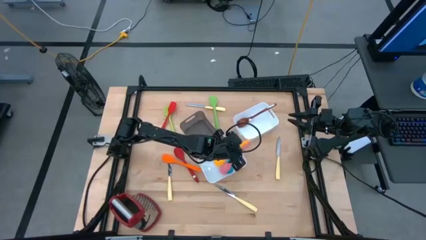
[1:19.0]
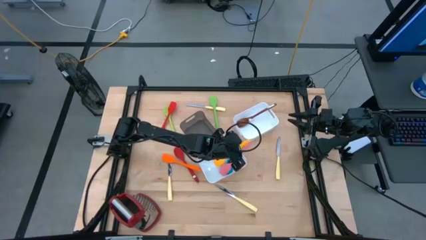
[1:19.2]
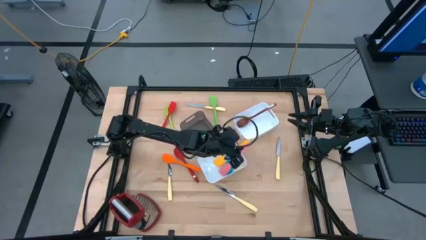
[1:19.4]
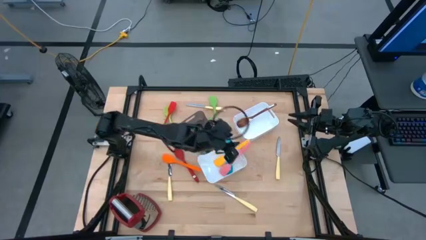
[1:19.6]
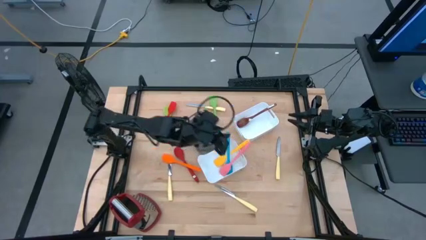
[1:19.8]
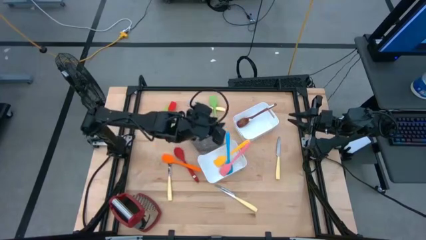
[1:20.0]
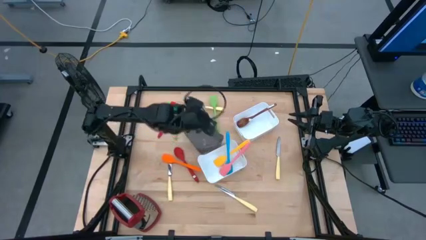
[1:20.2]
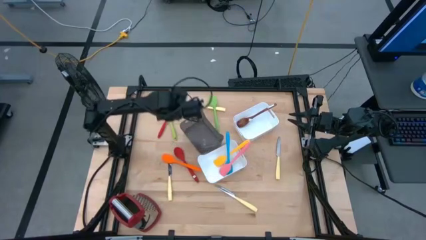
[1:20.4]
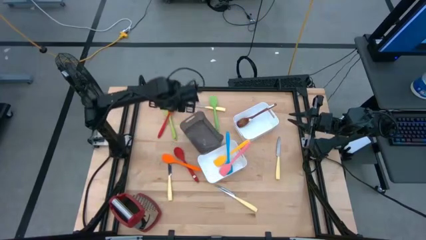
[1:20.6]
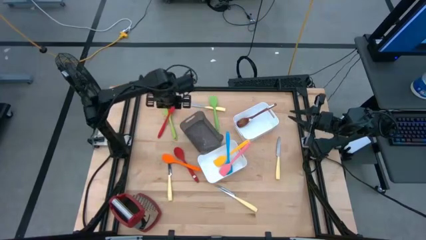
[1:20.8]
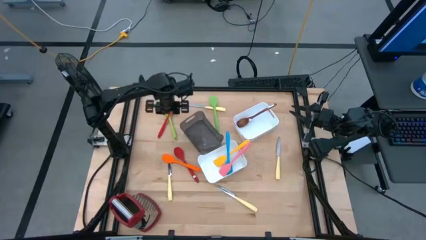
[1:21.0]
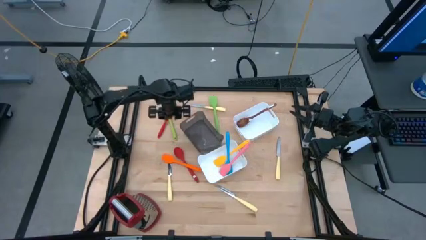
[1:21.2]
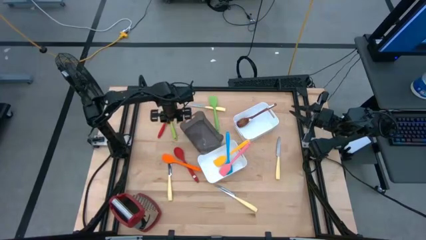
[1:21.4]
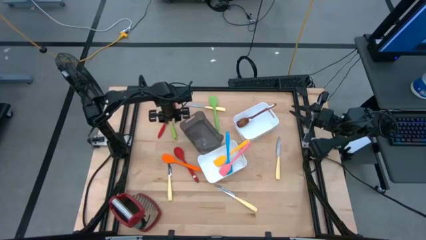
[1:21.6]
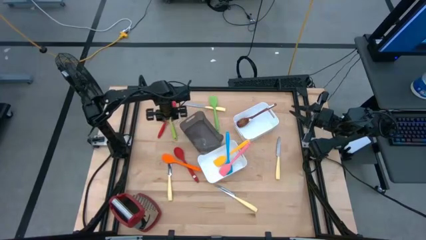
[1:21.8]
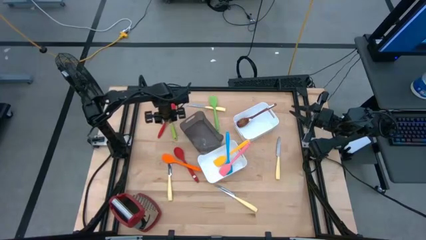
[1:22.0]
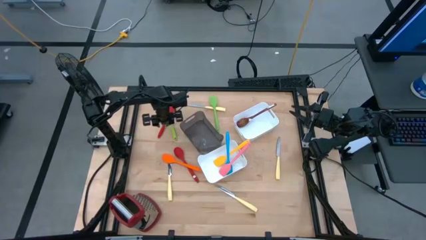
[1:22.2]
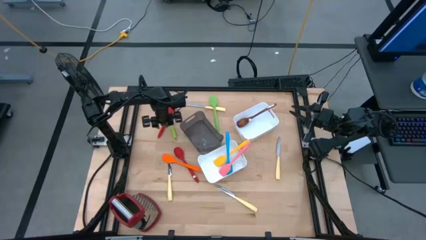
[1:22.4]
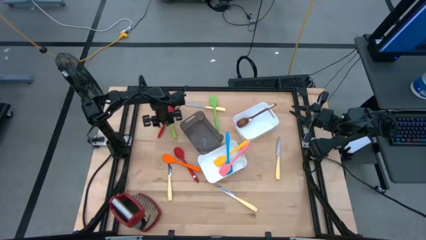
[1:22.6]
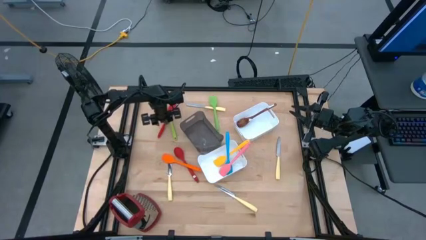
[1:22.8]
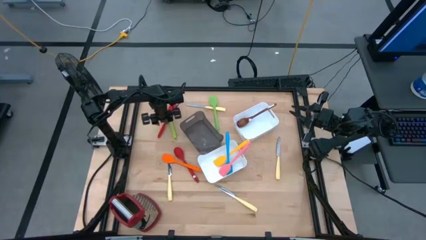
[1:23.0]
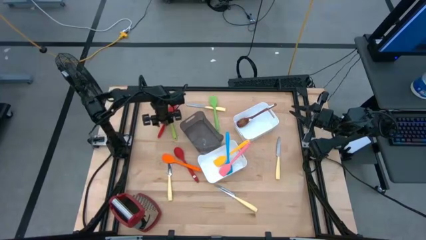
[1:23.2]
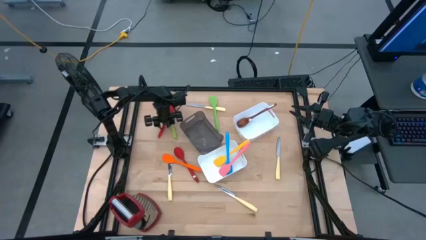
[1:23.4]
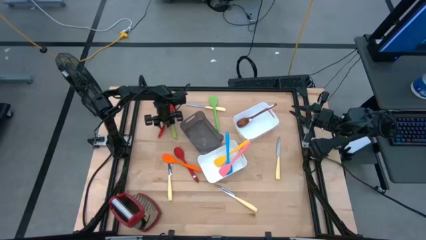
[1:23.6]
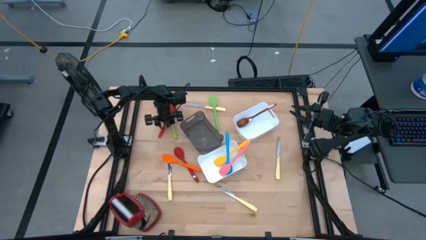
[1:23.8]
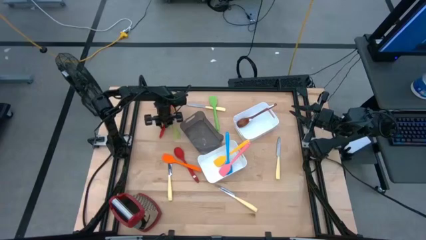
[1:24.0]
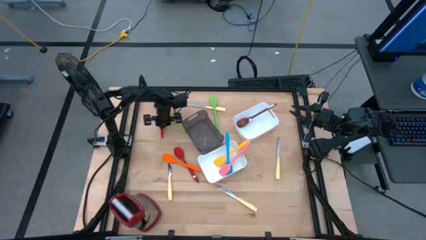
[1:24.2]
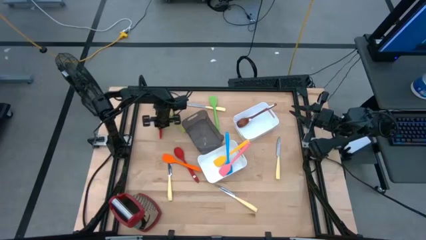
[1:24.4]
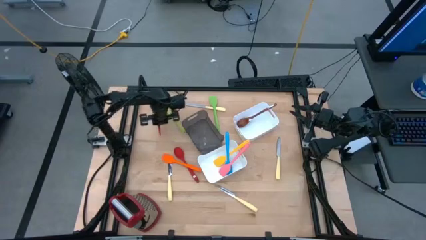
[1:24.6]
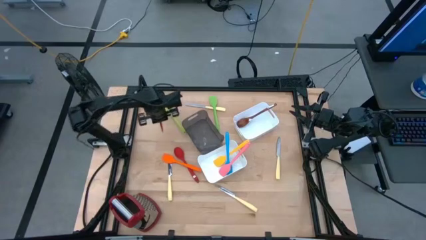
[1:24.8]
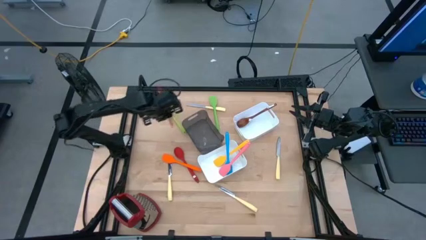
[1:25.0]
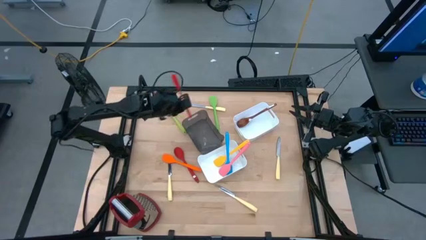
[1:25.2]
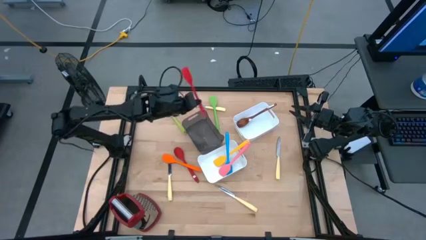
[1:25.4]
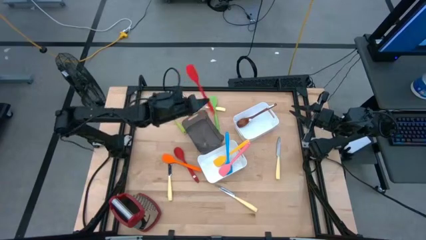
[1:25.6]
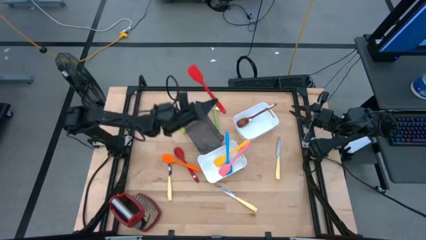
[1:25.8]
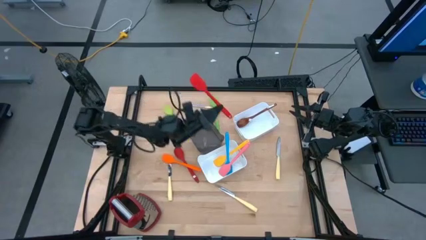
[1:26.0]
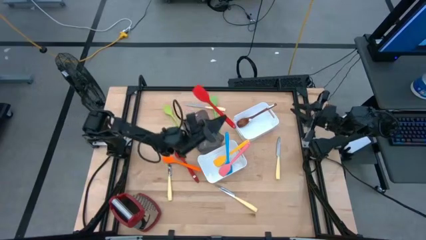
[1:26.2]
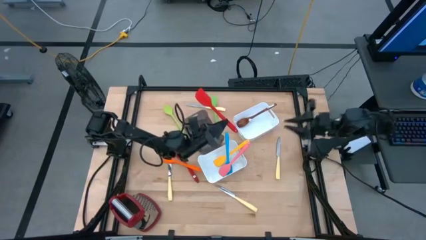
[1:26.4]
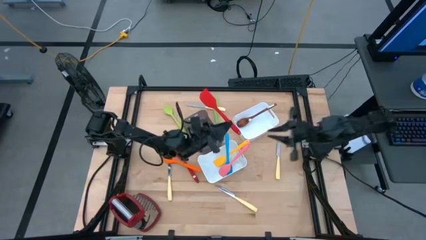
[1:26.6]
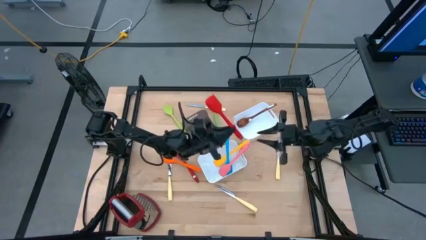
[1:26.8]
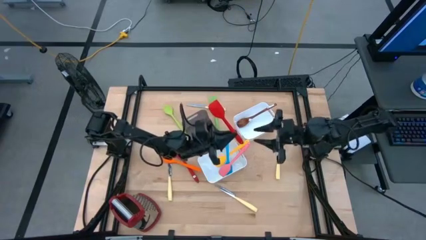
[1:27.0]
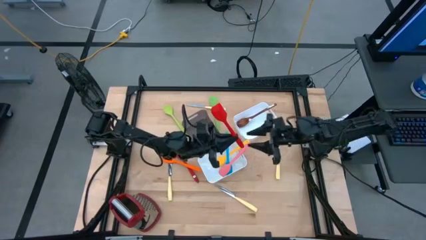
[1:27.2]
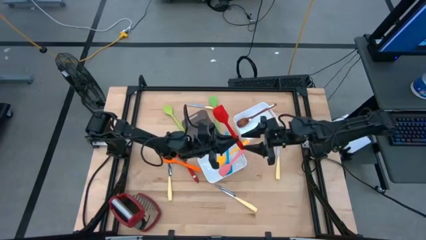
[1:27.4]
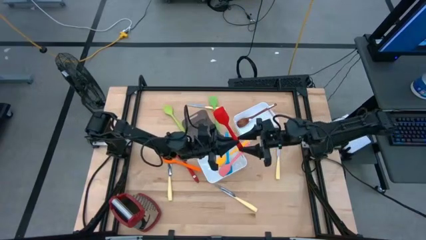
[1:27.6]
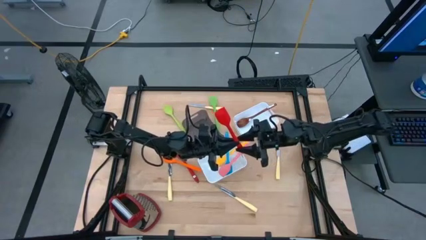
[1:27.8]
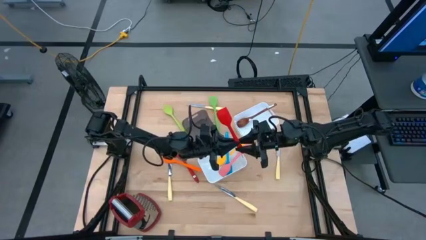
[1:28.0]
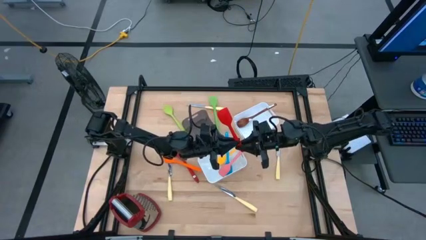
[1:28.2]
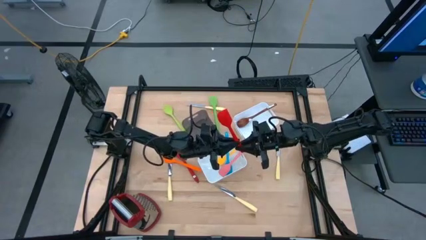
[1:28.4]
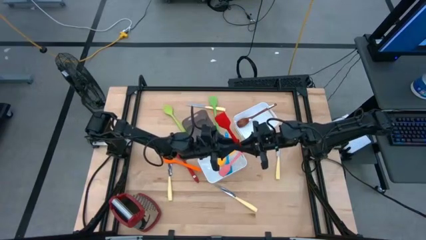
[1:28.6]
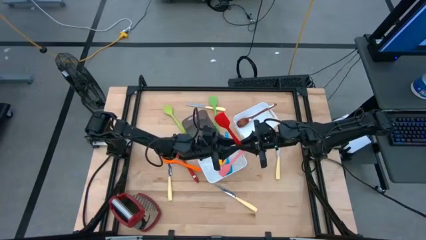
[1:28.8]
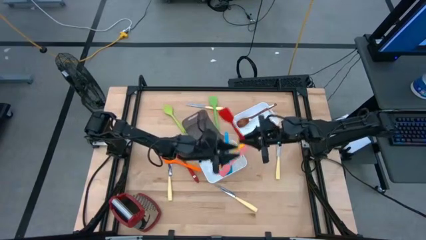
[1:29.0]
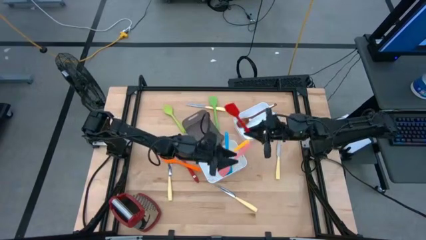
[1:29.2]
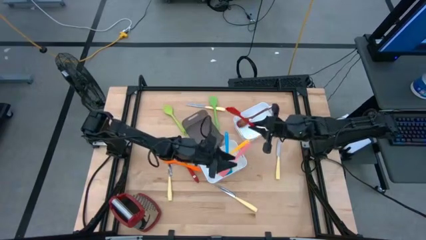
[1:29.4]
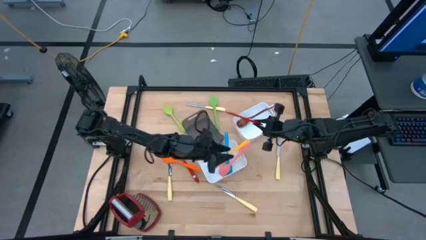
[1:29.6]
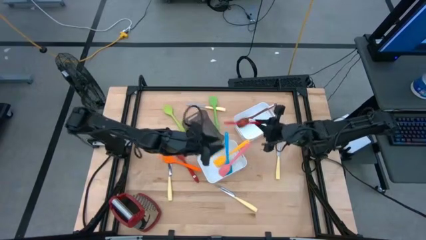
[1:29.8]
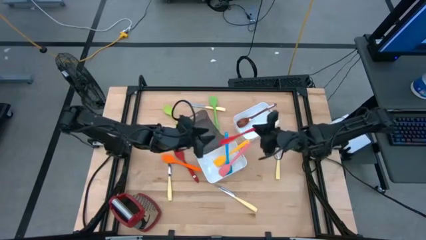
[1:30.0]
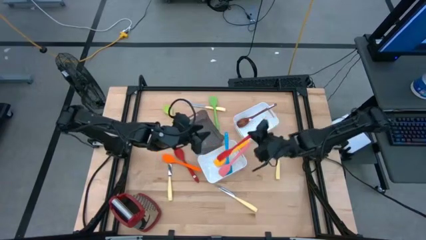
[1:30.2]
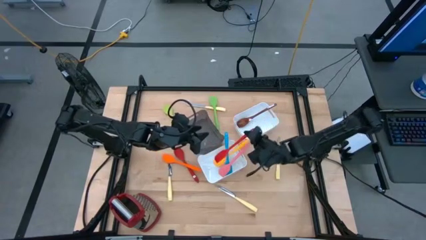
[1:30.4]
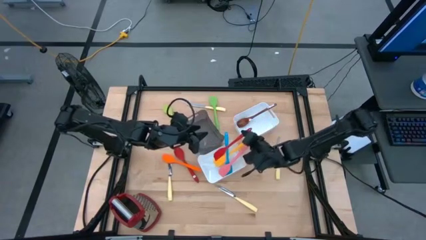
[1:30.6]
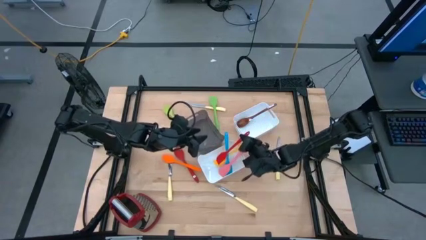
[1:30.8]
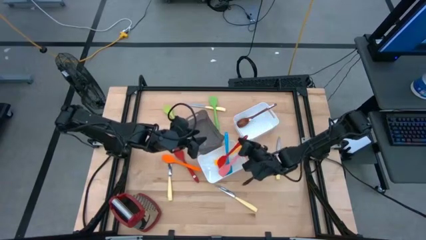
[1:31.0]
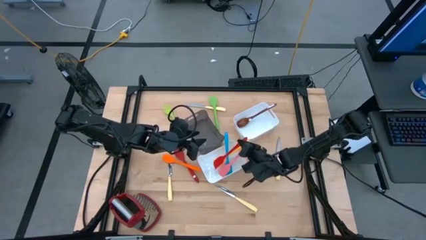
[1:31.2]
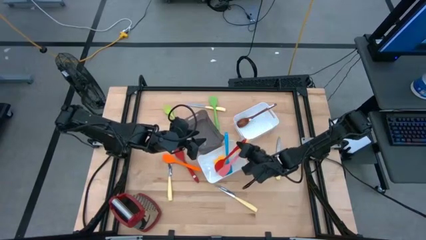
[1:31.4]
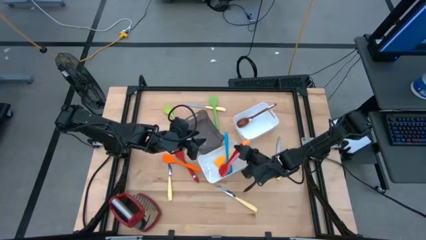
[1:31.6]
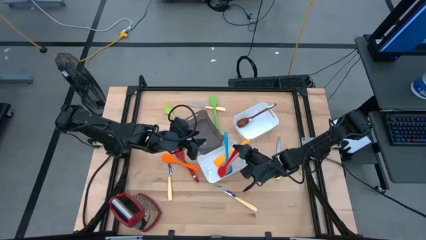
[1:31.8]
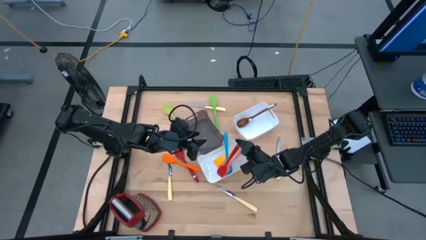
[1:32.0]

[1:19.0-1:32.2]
Task: Pick & Place Kitchen Items
Put the red spatula into the bottom white bin

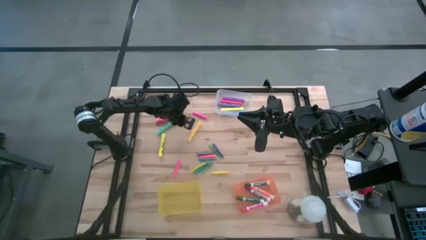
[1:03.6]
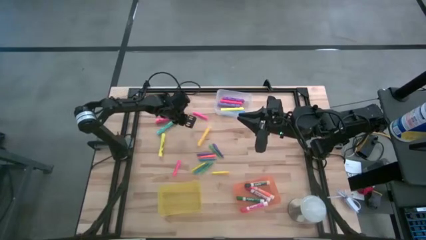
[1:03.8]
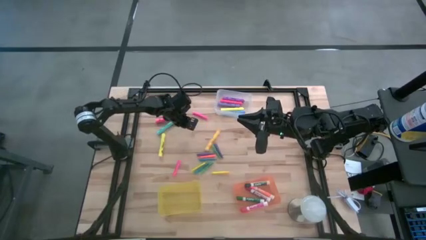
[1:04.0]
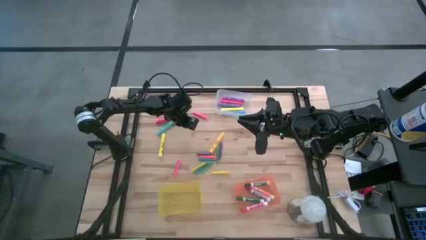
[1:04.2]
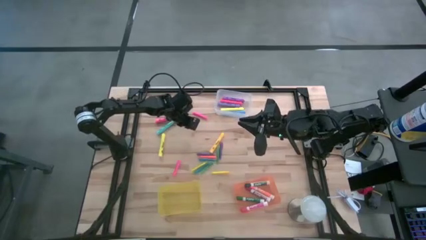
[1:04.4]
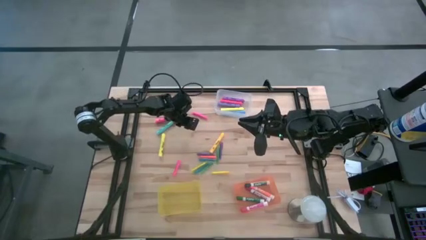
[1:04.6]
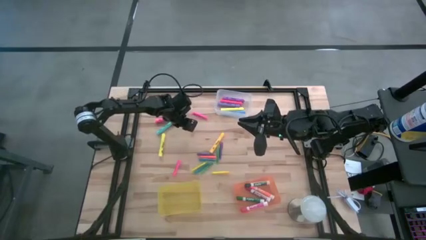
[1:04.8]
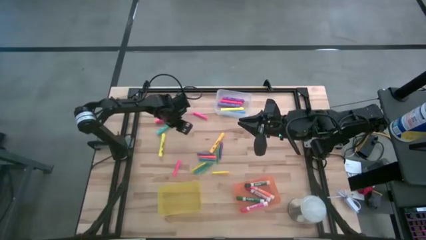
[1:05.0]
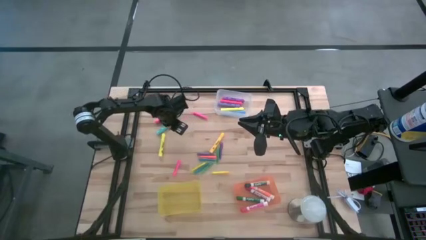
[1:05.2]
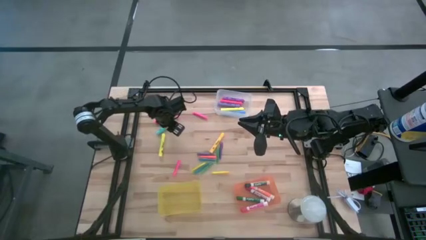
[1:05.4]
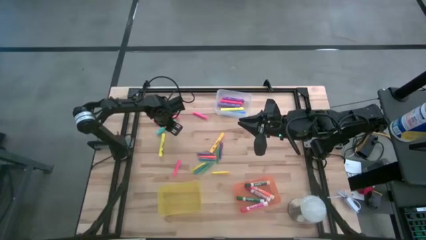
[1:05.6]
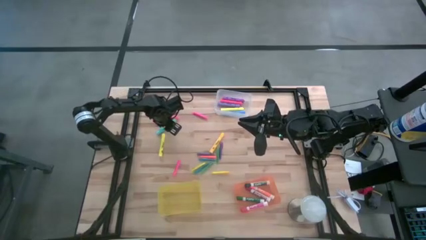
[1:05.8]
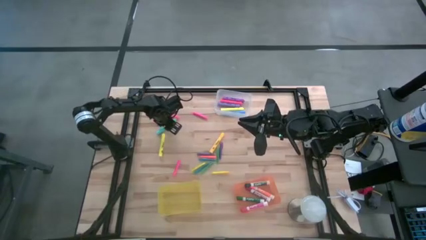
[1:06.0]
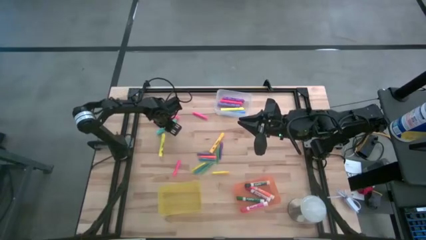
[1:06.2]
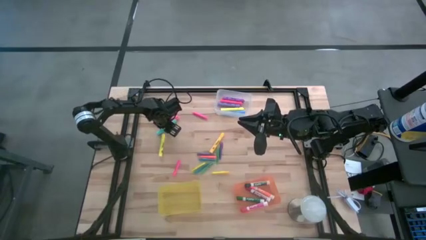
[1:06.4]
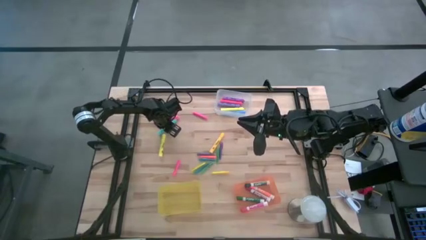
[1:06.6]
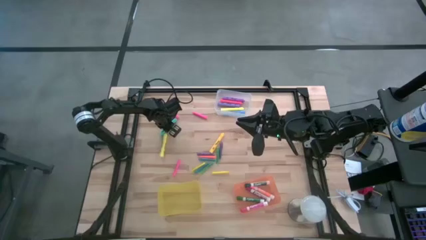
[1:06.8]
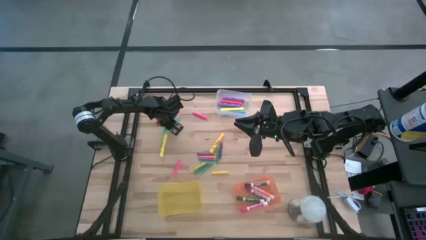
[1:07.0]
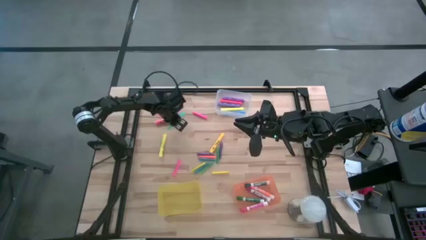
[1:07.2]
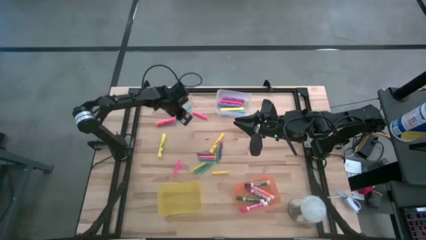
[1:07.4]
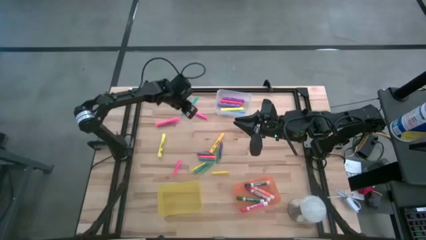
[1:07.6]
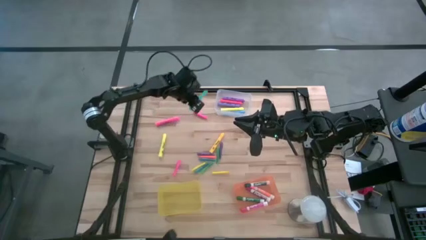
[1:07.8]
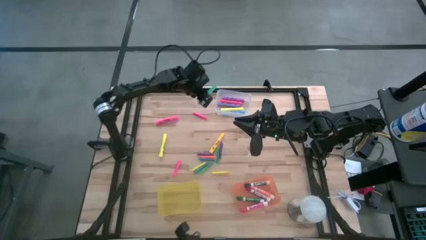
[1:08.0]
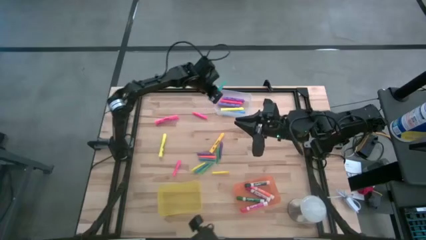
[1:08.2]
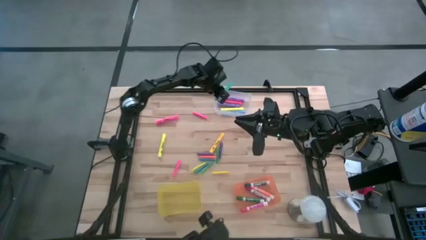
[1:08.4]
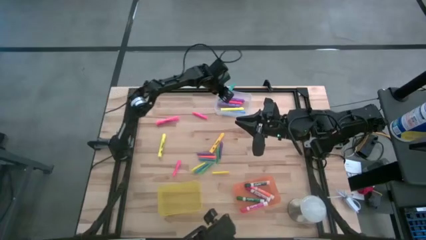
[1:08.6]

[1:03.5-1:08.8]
Task: Pick & Place Markers
Put the light blue highlighter pen into the transparent bin
